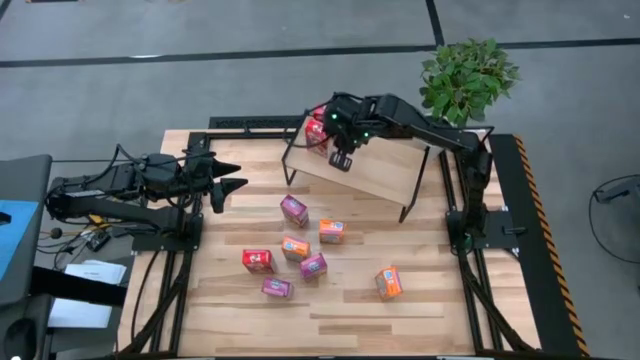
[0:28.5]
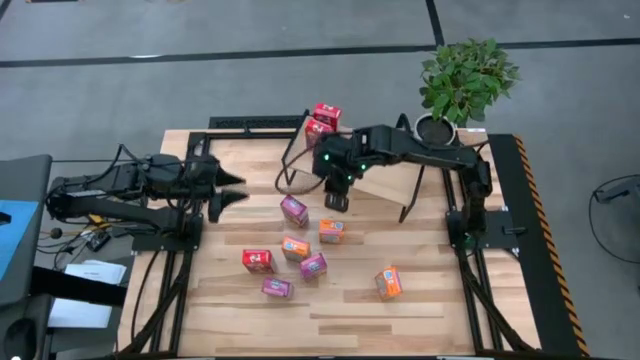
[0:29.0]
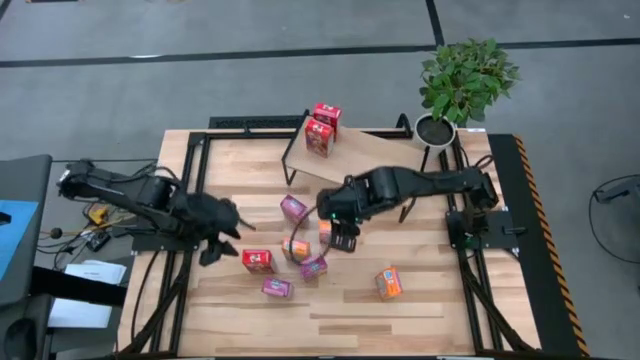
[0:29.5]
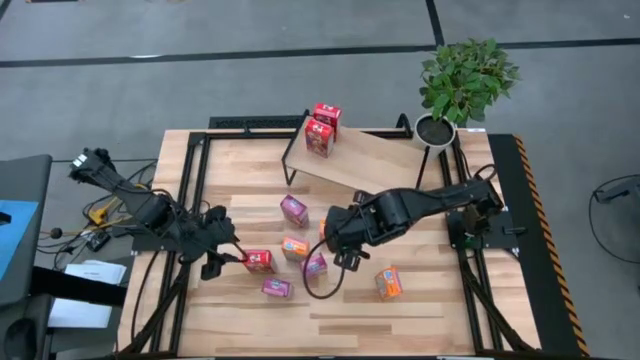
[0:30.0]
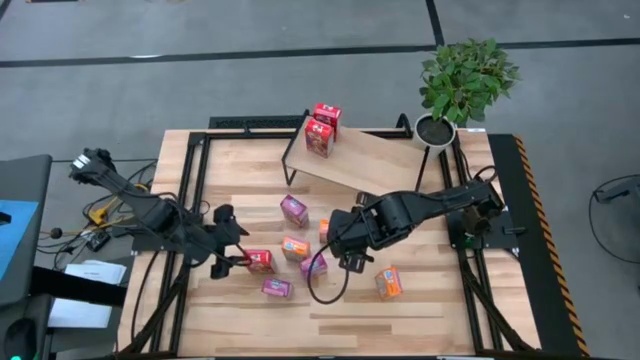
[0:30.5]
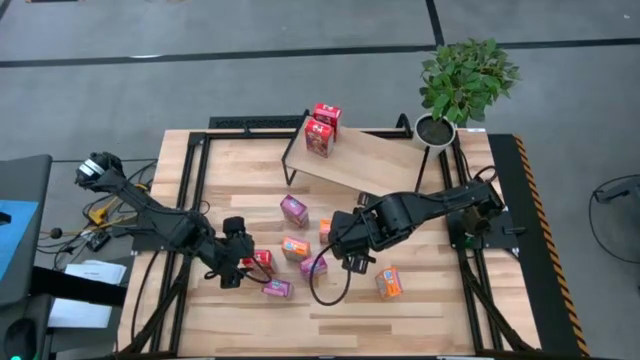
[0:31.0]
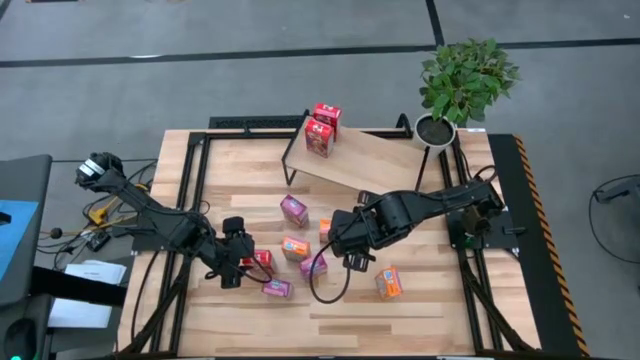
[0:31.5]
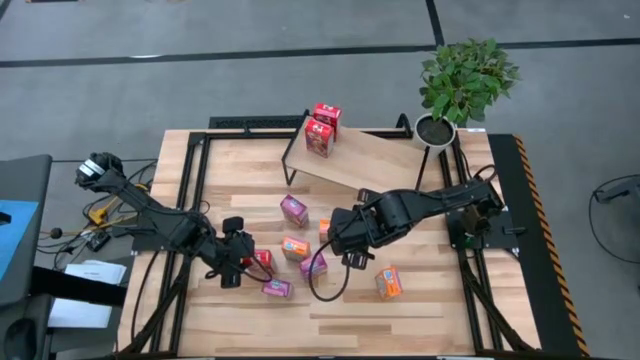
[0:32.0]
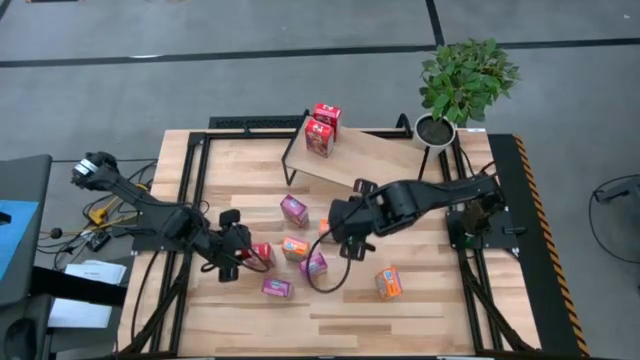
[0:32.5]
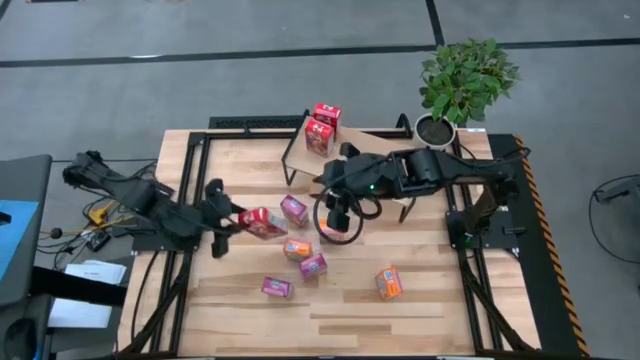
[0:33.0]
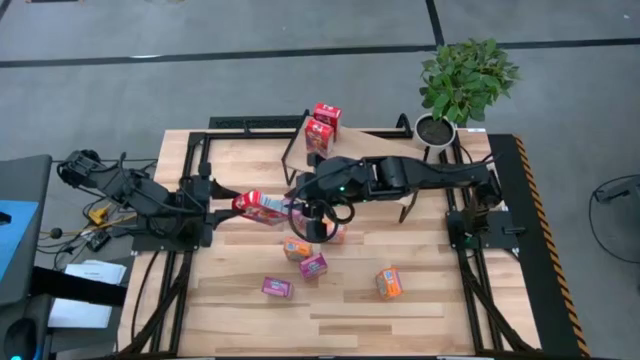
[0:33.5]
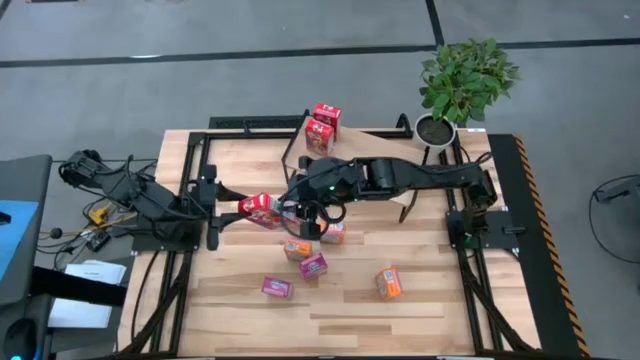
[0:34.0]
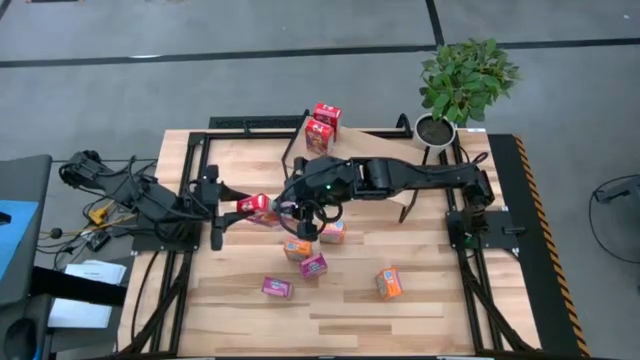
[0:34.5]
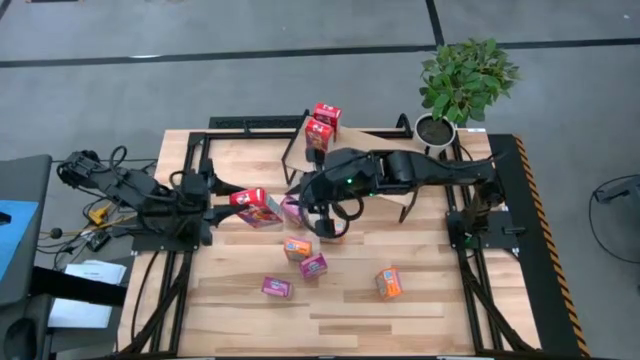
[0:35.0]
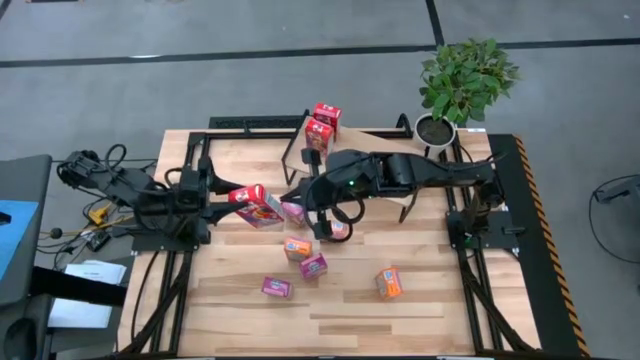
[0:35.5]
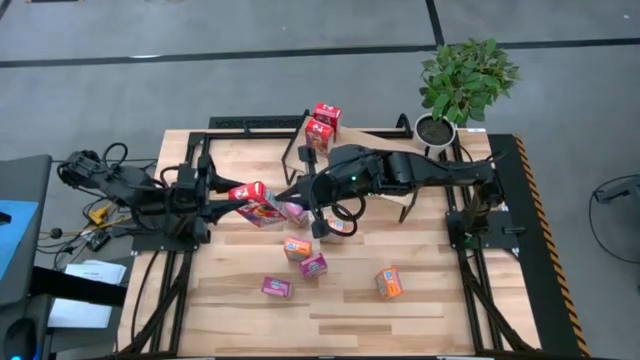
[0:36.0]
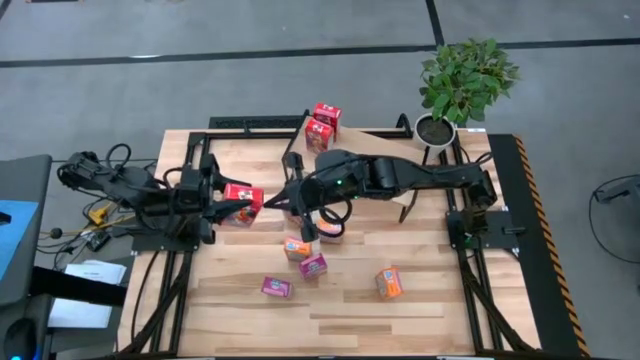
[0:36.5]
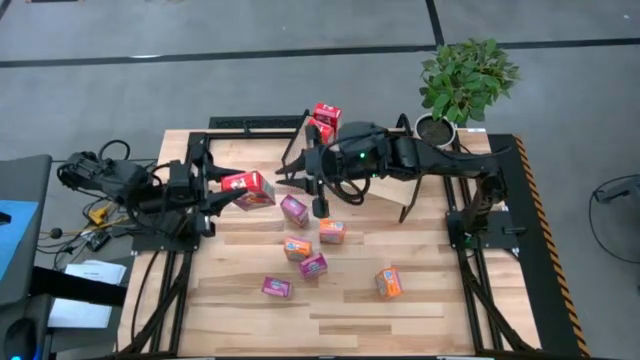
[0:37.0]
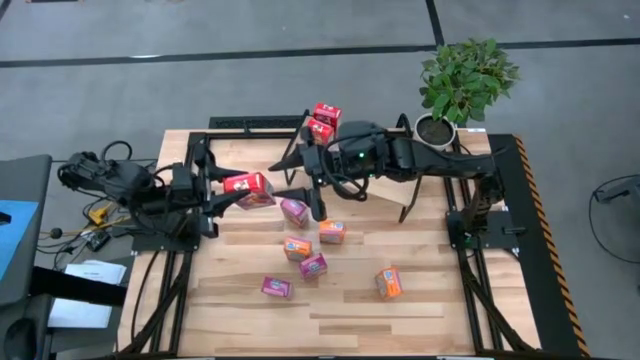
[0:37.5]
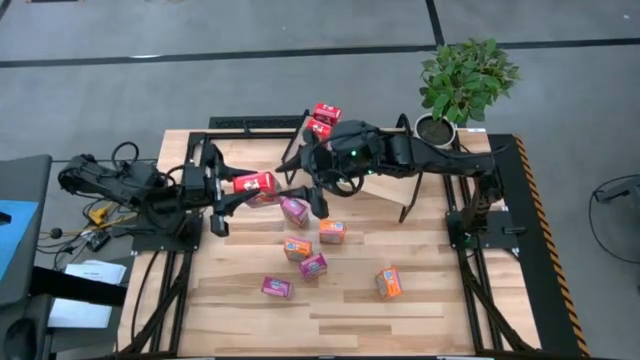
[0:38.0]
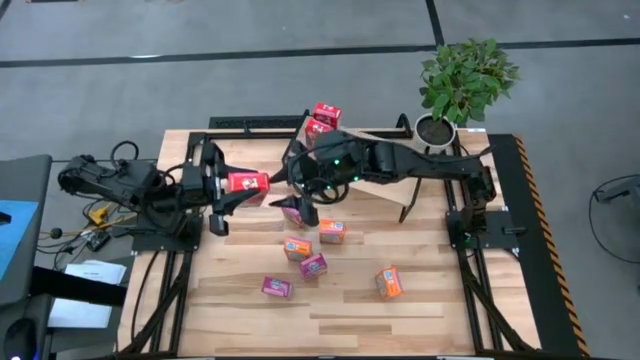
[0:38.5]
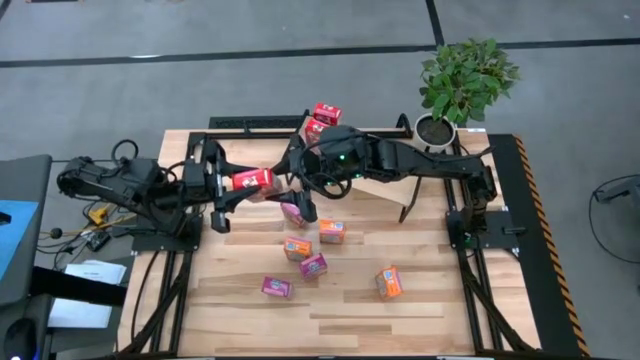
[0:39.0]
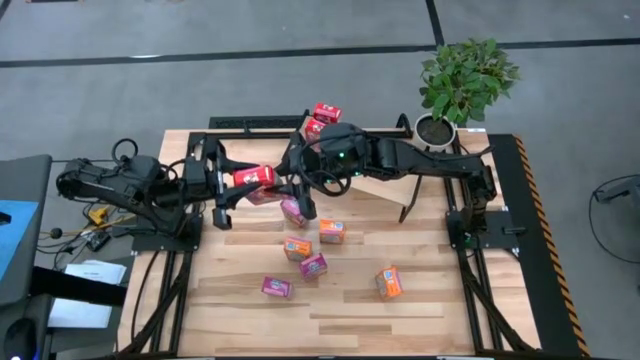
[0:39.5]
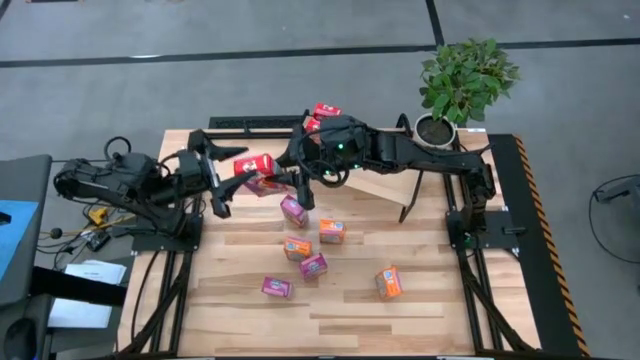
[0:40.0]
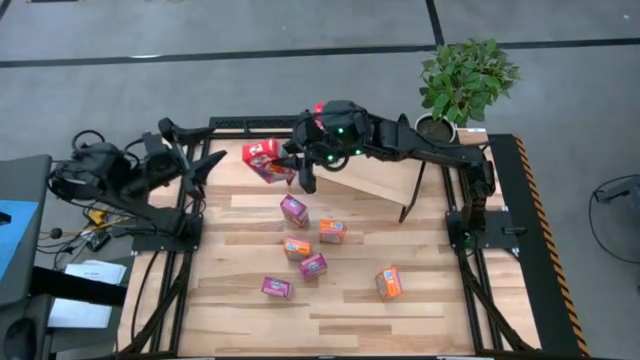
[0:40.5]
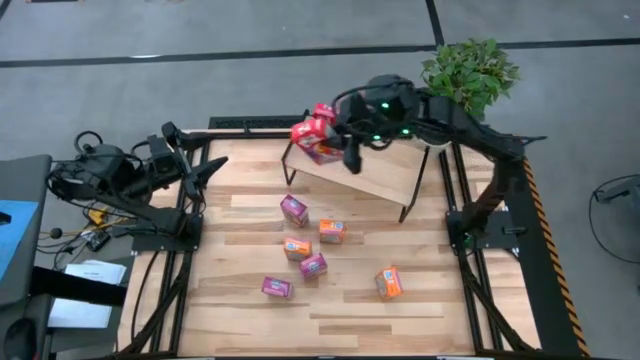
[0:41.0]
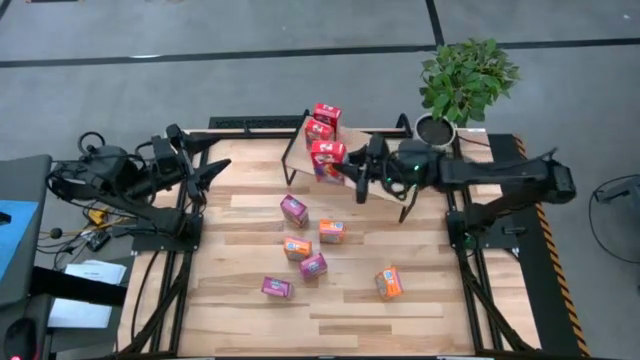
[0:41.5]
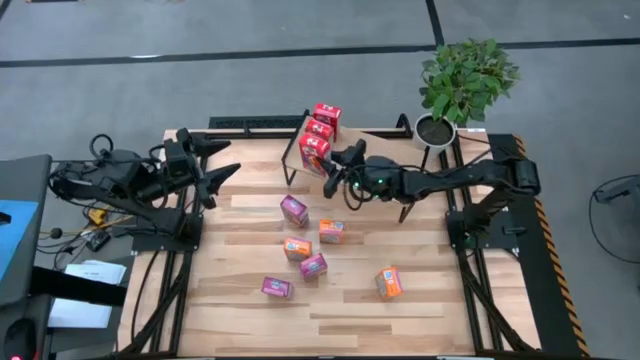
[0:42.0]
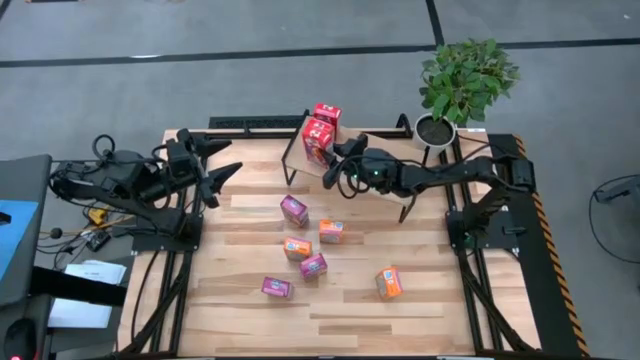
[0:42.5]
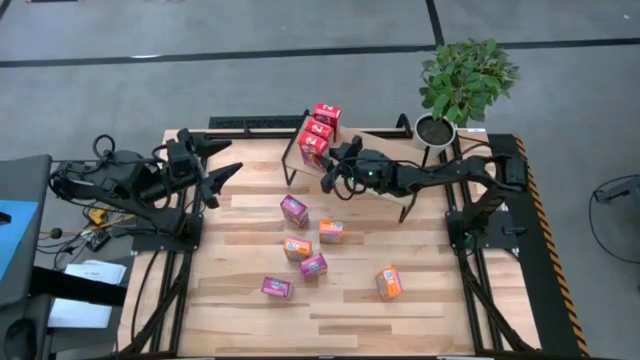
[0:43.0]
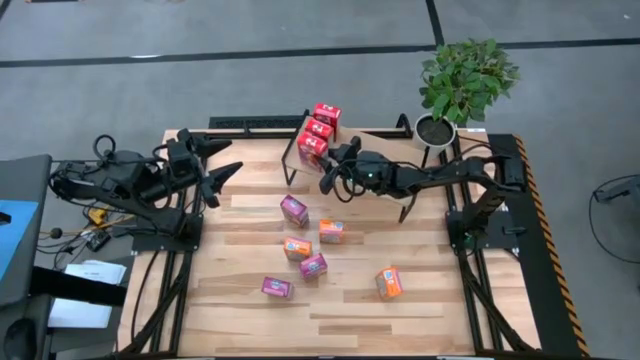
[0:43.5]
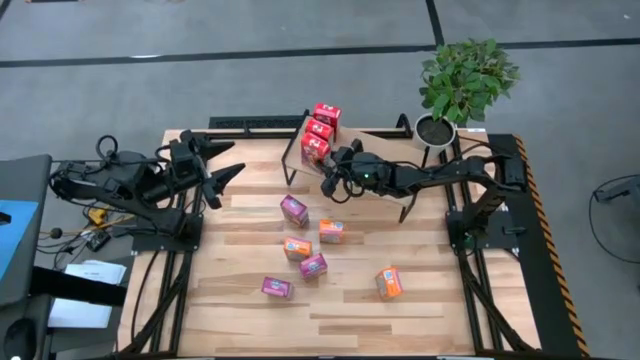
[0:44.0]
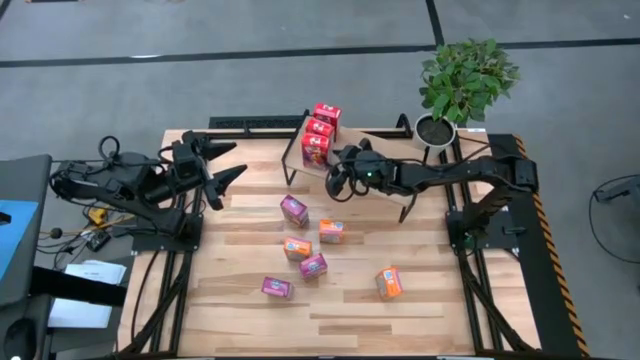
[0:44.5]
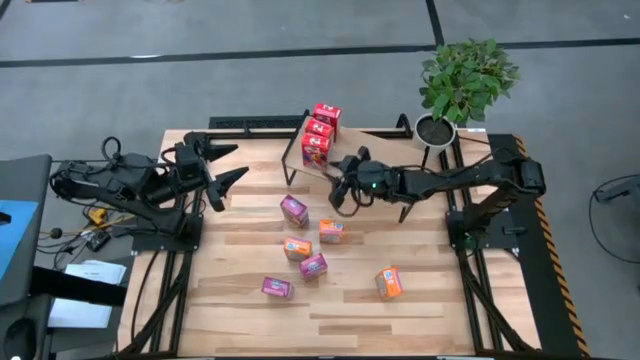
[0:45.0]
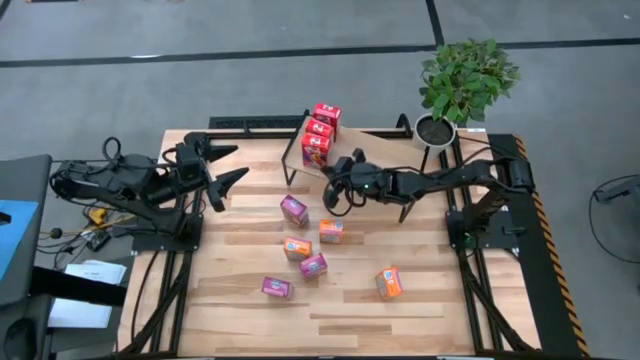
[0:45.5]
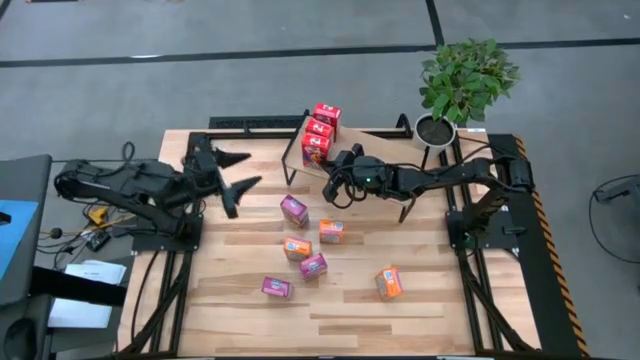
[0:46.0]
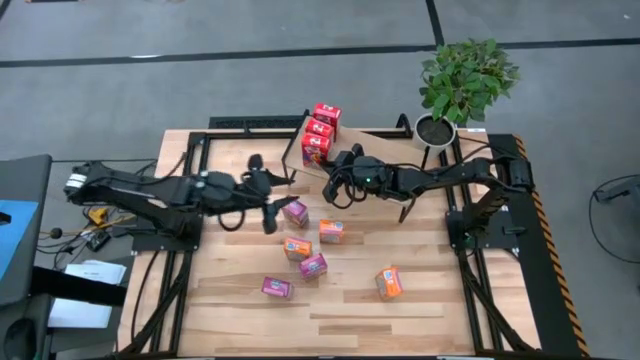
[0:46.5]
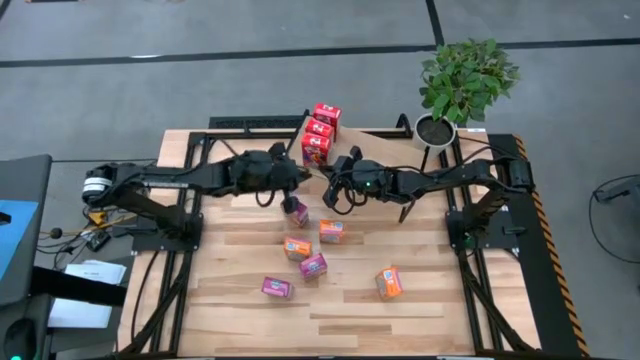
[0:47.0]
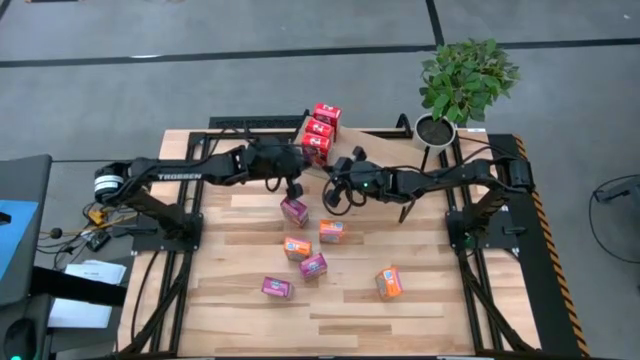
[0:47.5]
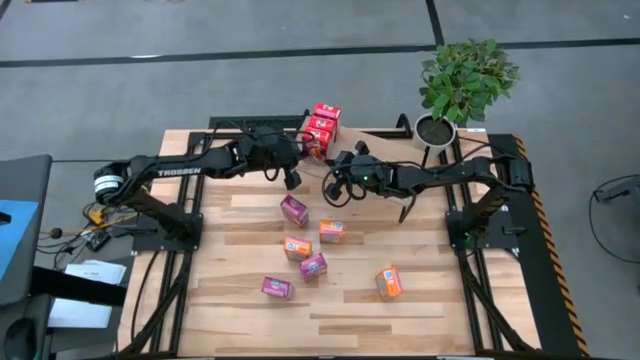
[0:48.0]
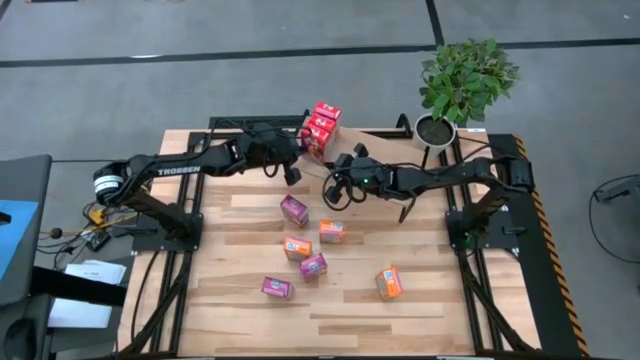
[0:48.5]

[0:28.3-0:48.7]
Task: Stack cereal on shelf
Put the red cereal box on the shelf aligned with the other red cereal boxes
